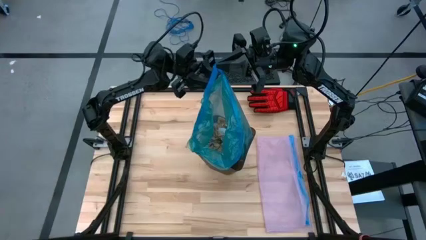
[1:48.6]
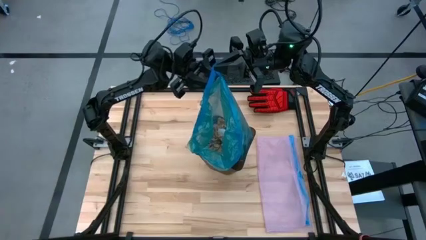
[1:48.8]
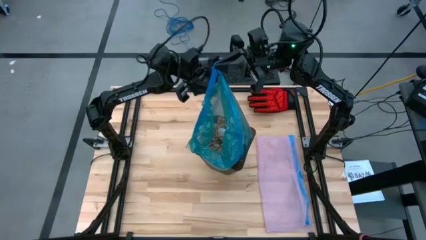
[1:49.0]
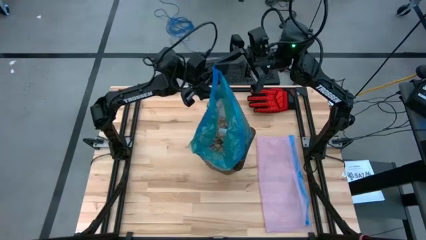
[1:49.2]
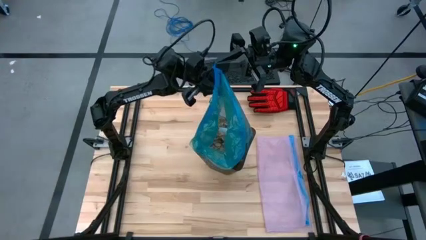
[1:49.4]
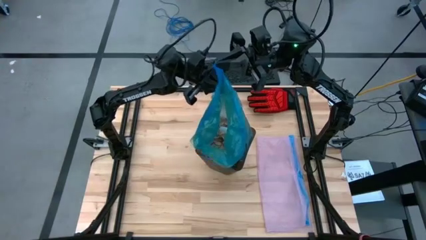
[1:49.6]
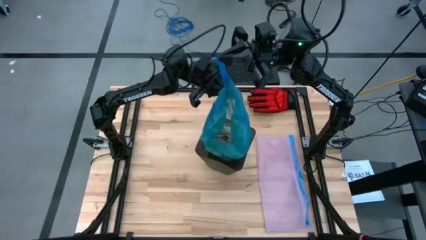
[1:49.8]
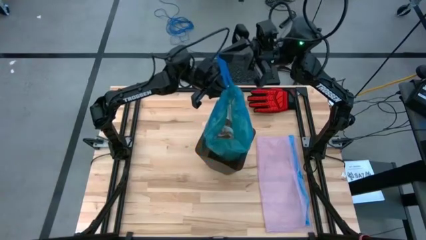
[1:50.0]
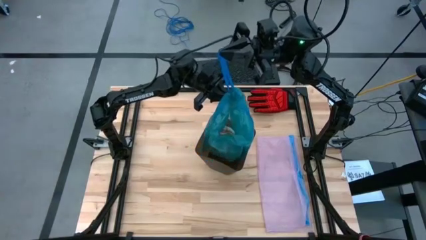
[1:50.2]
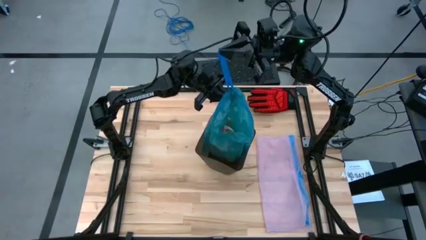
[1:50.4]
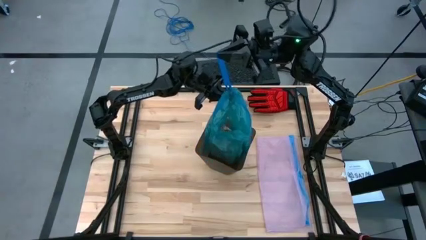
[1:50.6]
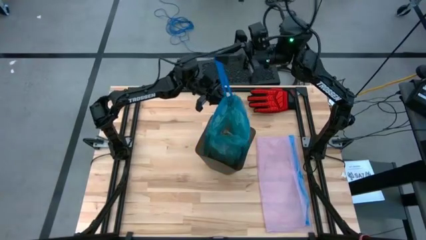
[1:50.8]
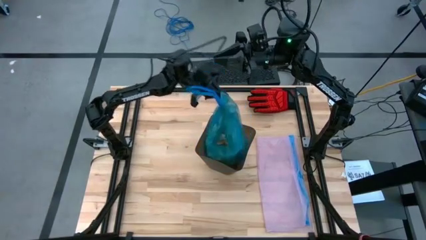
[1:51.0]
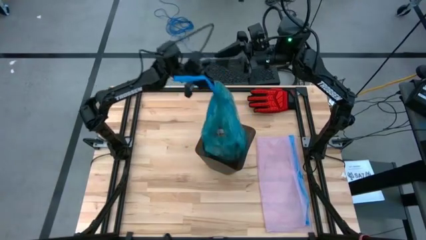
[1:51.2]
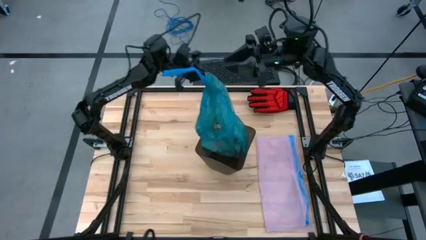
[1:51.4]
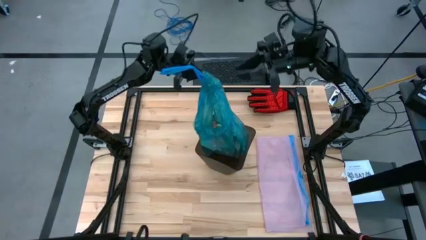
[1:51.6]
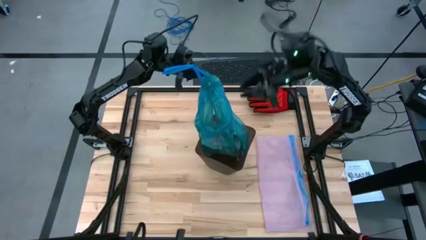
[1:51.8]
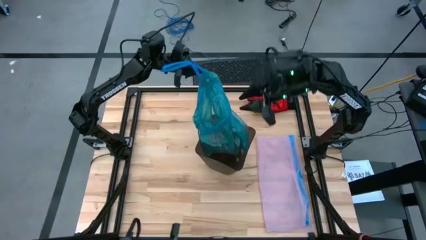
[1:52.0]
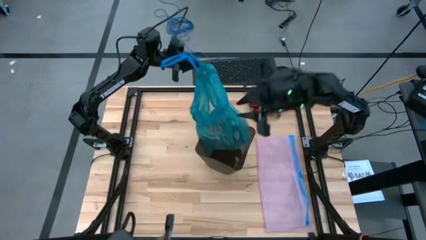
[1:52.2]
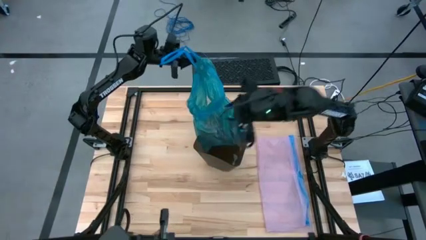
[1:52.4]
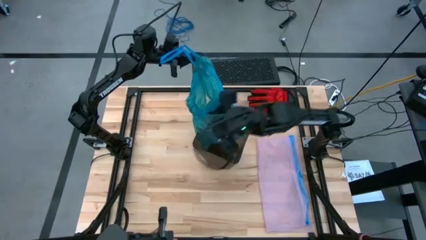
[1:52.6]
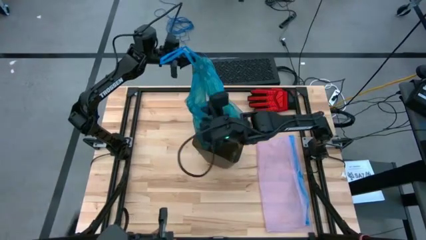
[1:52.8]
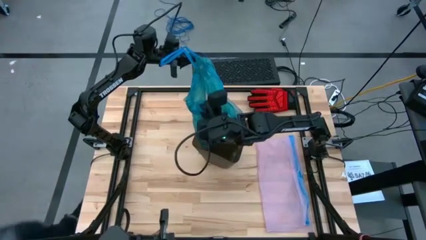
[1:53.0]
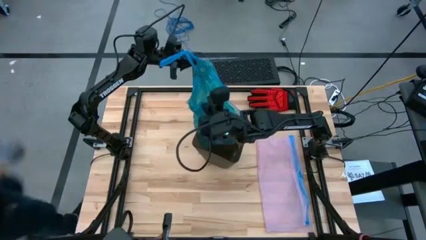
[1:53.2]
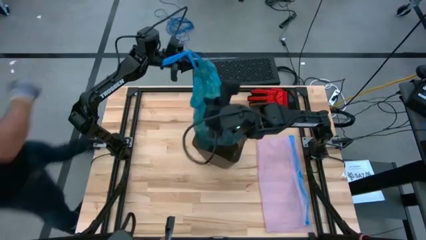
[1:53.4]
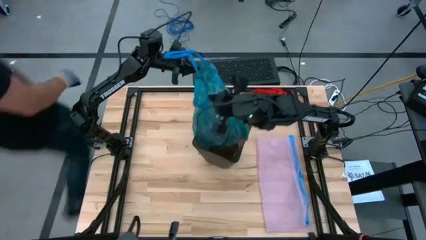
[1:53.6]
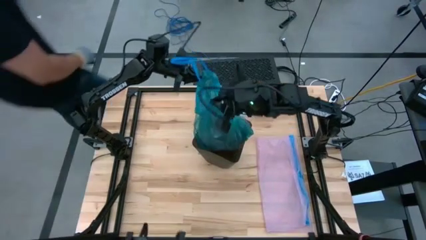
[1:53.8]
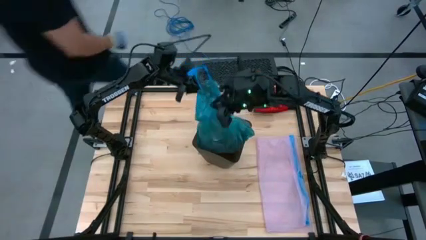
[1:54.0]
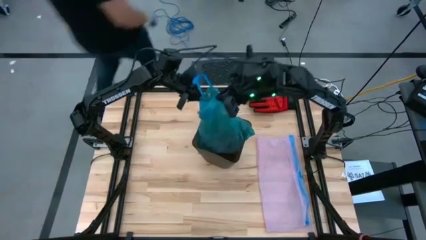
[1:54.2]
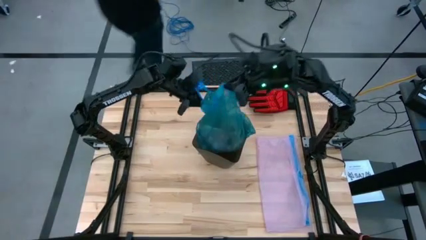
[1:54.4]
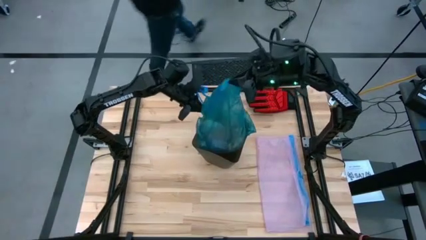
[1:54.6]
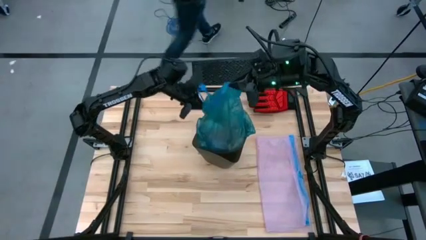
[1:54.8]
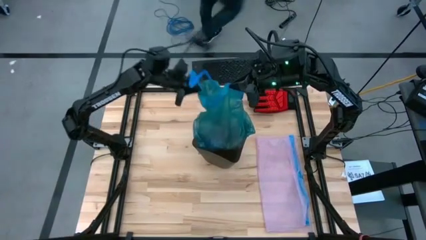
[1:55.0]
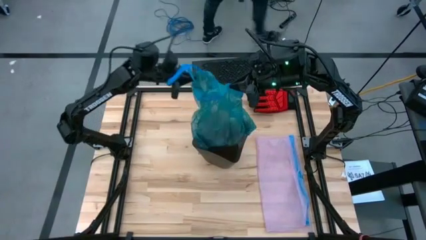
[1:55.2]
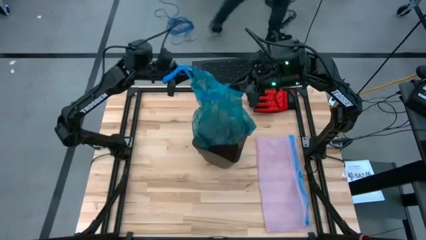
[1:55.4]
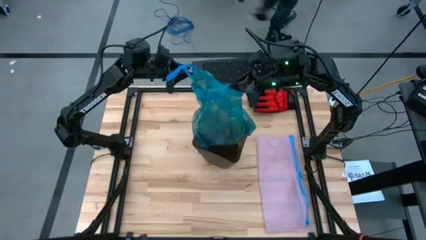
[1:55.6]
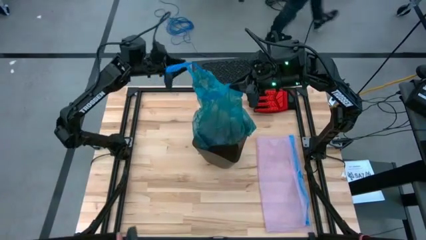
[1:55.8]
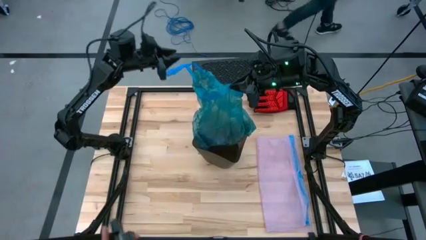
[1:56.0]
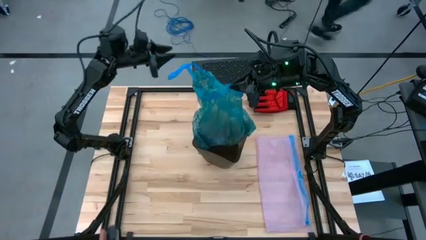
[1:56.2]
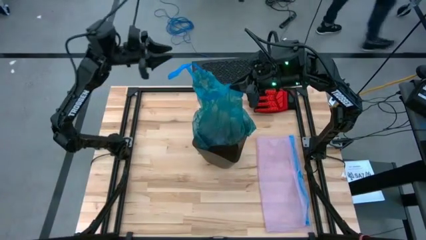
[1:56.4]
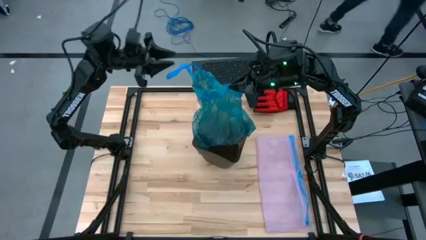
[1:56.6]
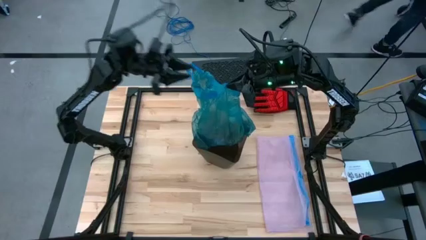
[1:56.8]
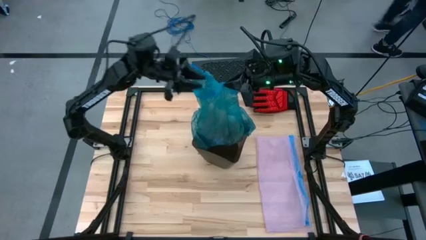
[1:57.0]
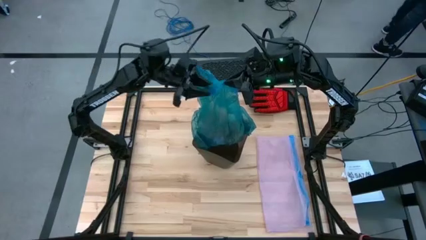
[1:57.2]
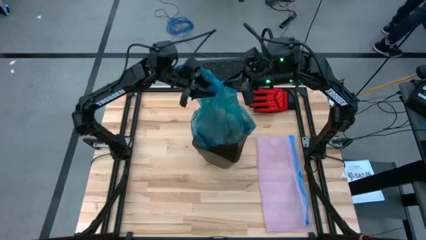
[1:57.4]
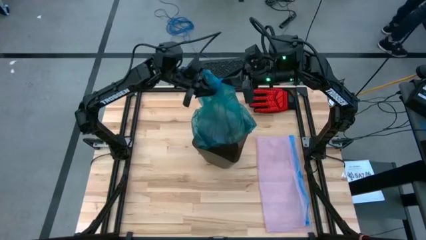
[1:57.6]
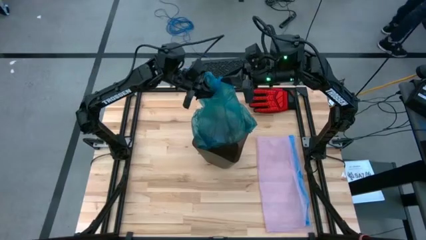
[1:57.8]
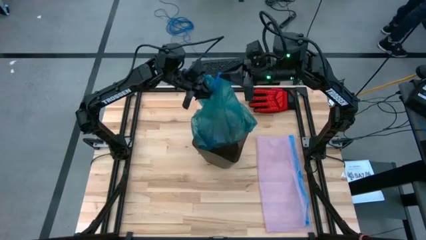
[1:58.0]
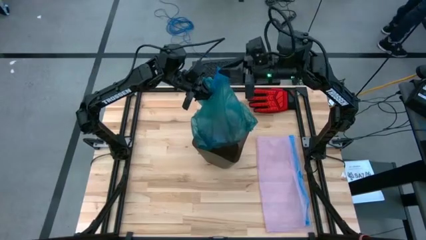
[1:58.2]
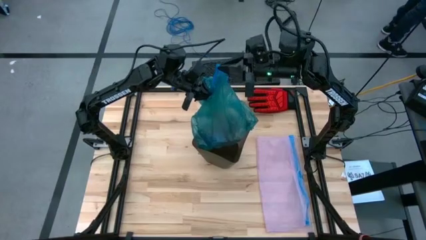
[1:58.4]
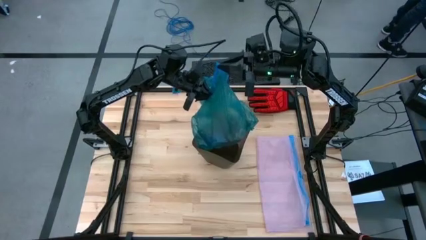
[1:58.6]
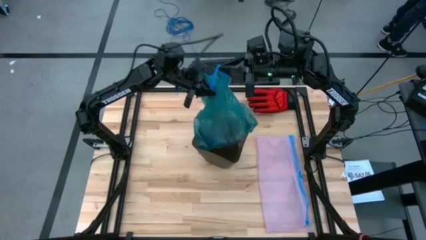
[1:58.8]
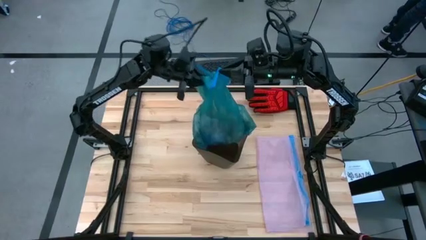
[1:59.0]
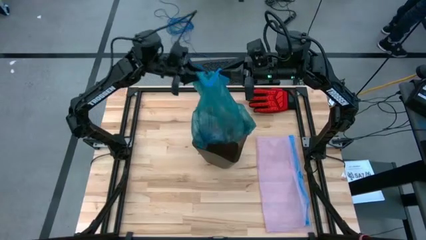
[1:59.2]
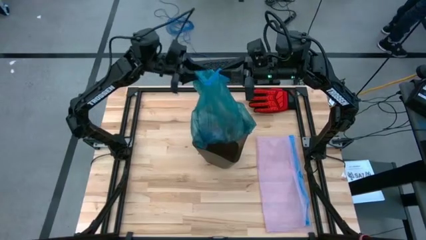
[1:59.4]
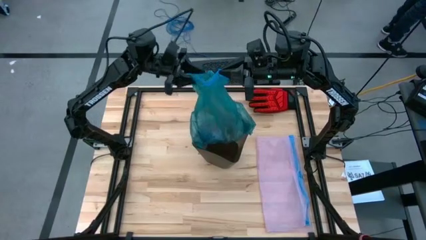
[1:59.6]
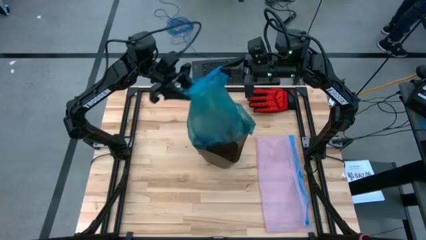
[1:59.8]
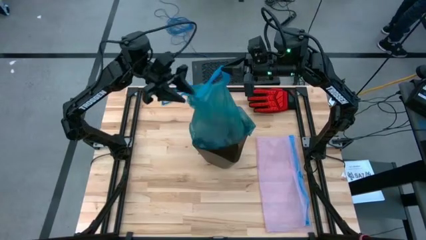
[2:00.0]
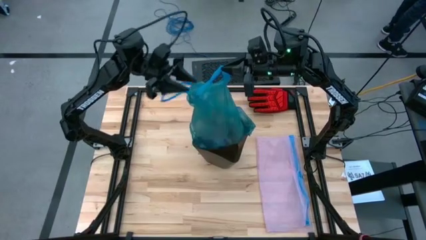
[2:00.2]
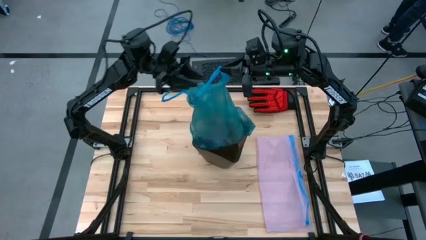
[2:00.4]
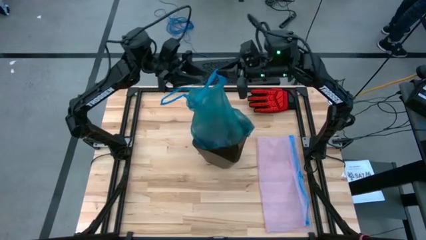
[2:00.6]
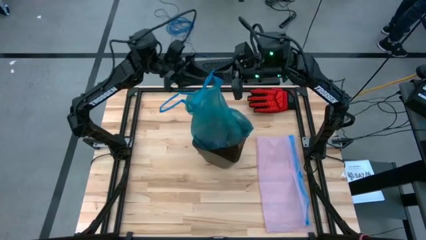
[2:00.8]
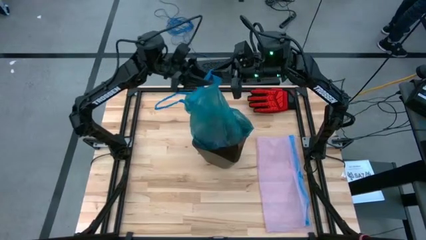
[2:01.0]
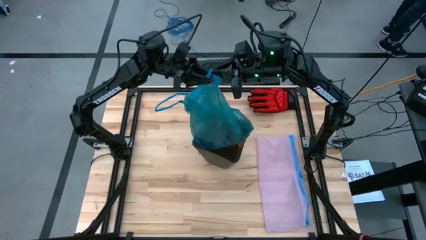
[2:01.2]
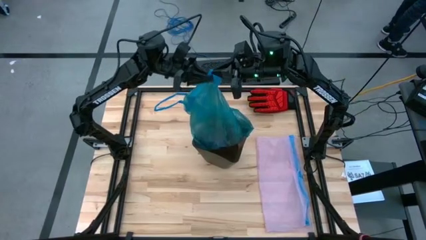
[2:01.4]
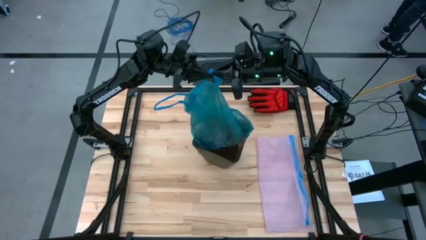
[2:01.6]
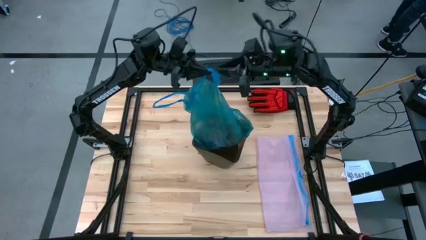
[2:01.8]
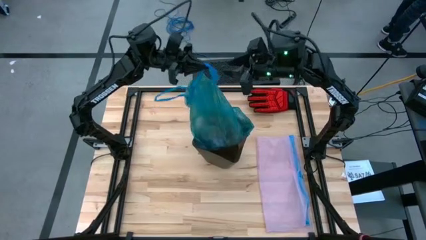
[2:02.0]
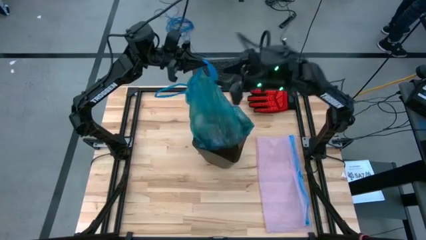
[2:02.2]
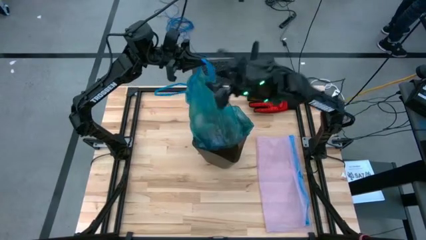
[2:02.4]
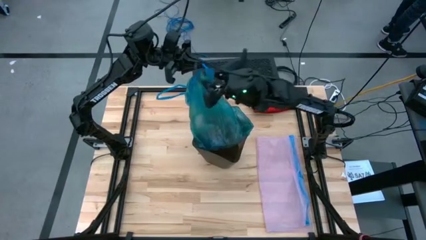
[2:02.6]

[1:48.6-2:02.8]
Task: place trash/remove bag and relplace
Remove the blue trash bag from the trash bin

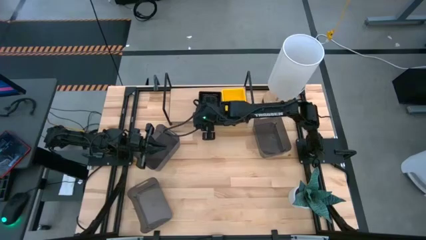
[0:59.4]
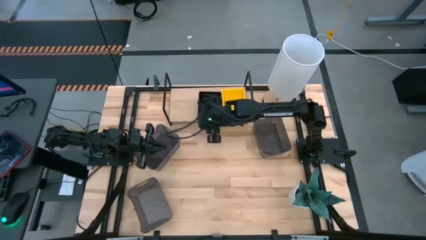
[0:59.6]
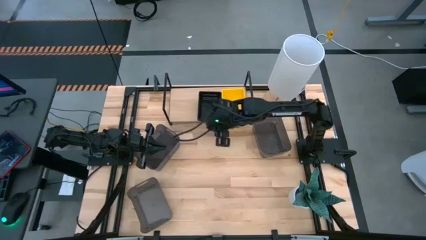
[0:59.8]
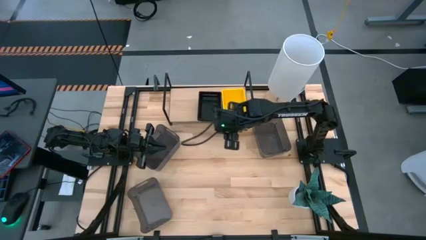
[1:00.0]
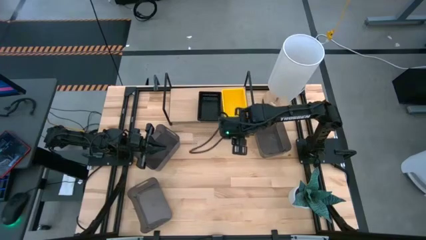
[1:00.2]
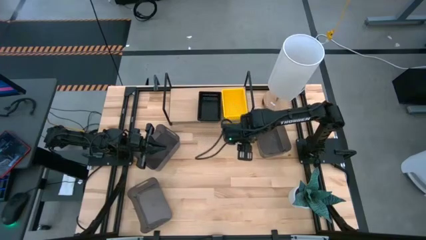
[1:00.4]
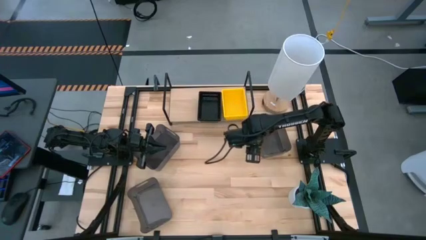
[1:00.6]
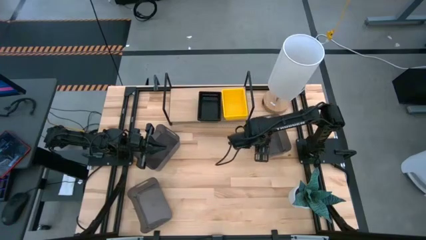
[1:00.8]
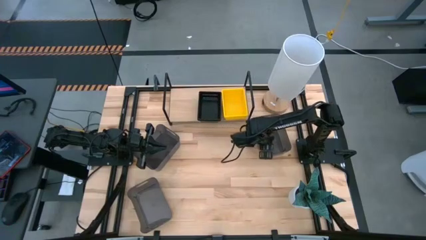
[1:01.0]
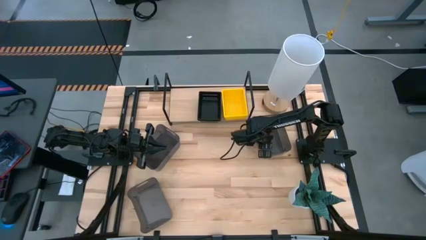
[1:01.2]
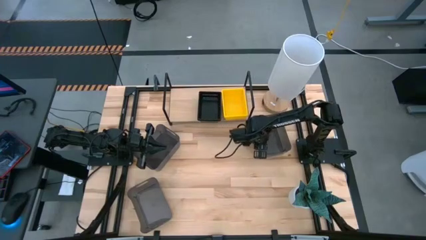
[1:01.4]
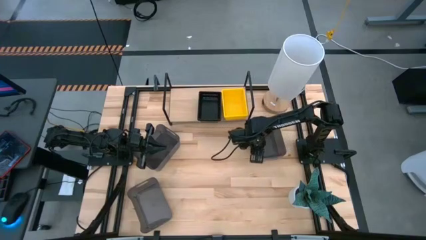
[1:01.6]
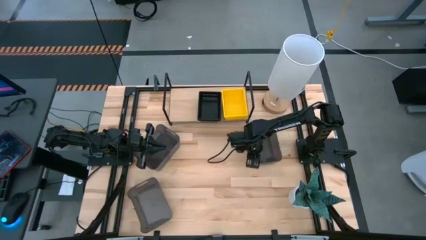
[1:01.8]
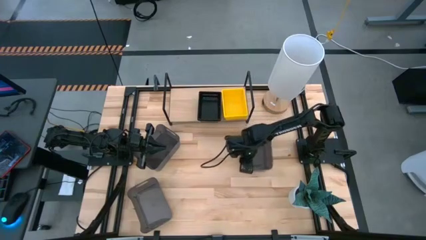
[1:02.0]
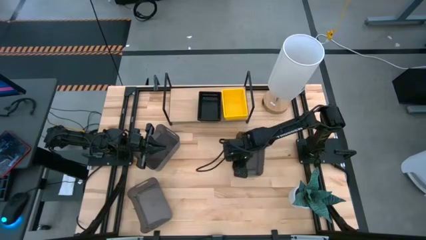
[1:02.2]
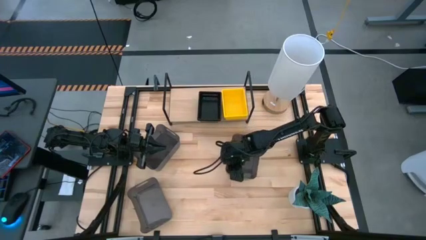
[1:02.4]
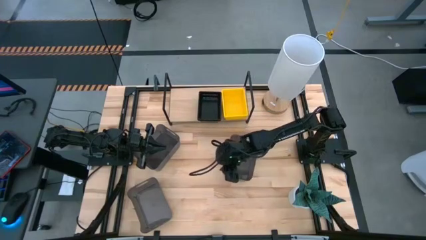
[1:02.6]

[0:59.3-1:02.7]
Task: Stack baskets on shelf by color
Move the gray bin to the center of the table
